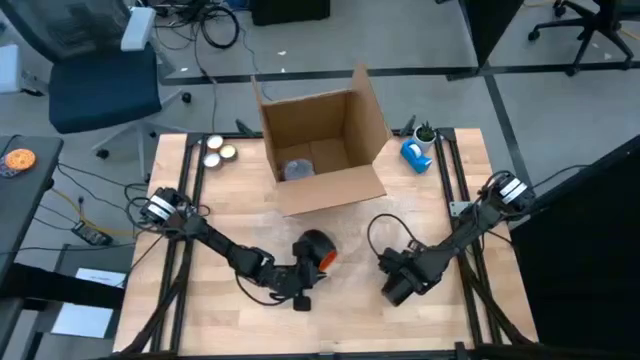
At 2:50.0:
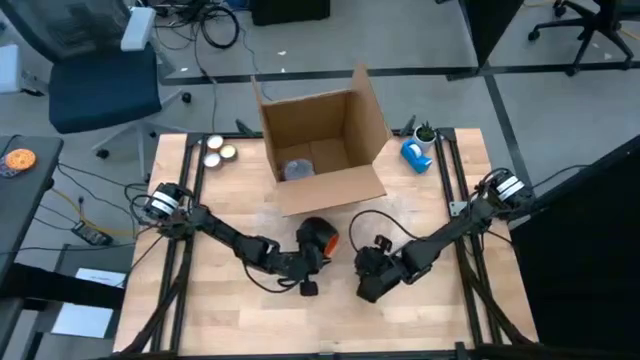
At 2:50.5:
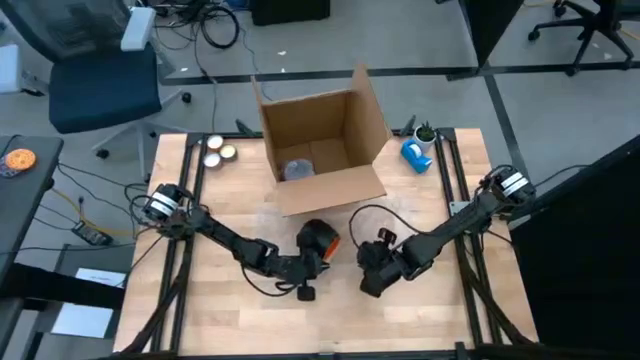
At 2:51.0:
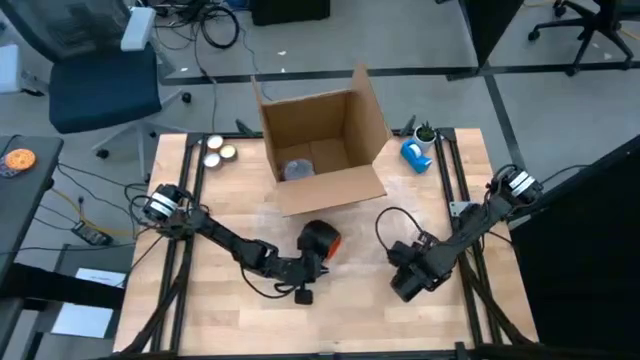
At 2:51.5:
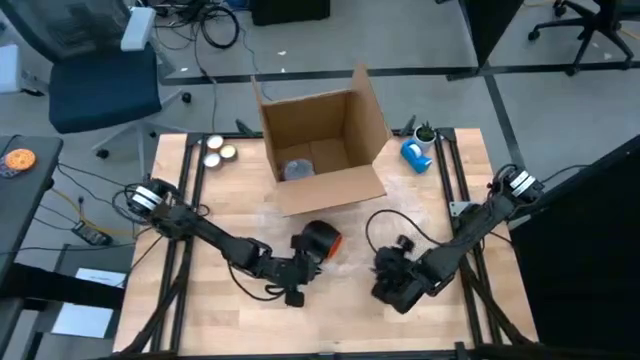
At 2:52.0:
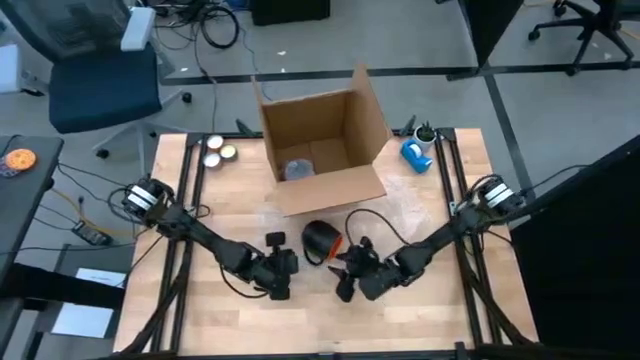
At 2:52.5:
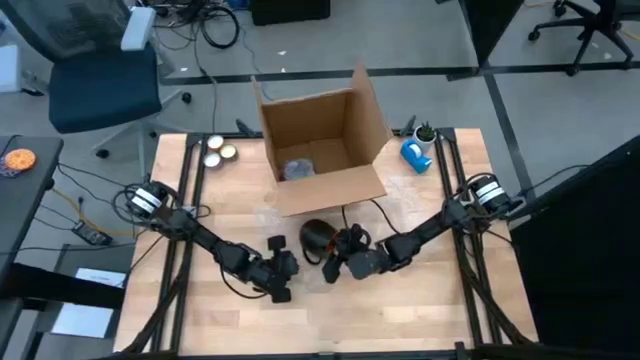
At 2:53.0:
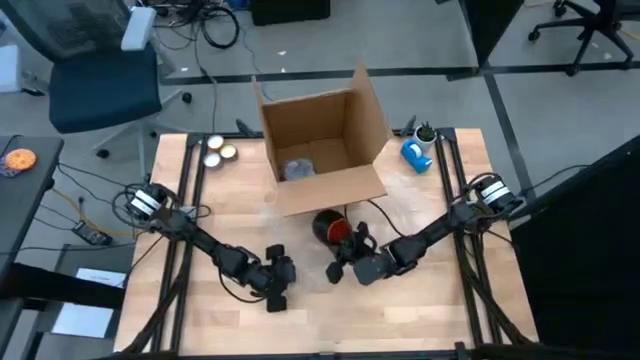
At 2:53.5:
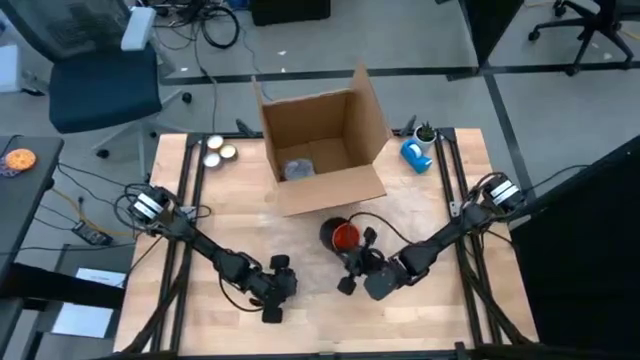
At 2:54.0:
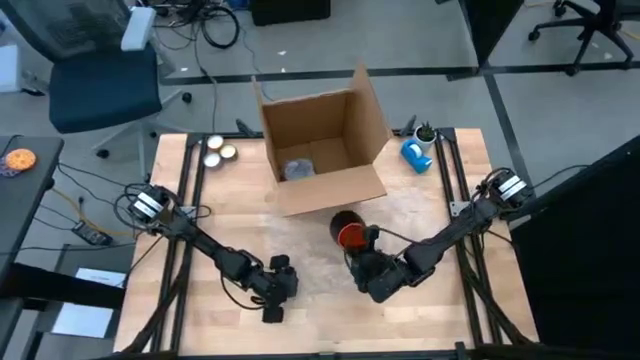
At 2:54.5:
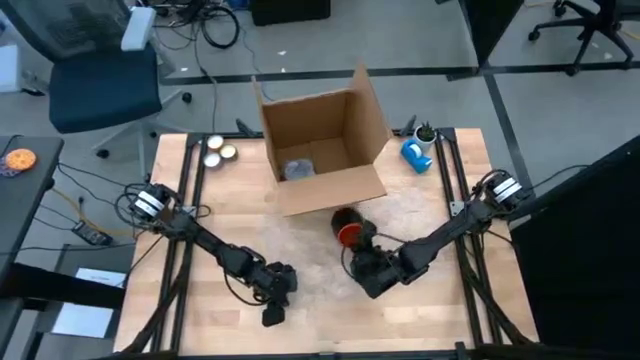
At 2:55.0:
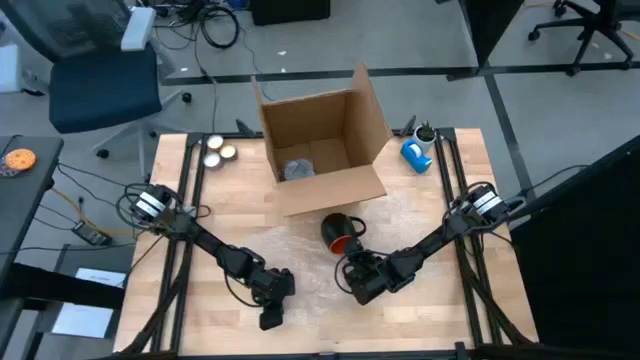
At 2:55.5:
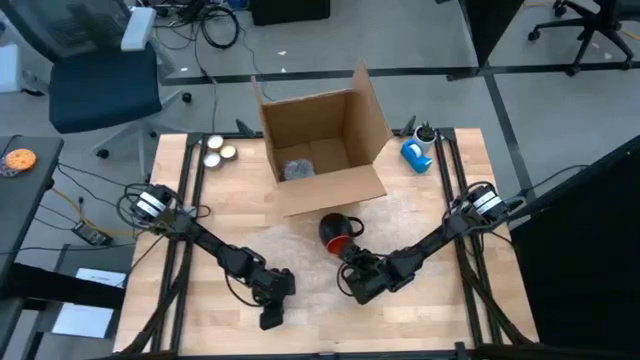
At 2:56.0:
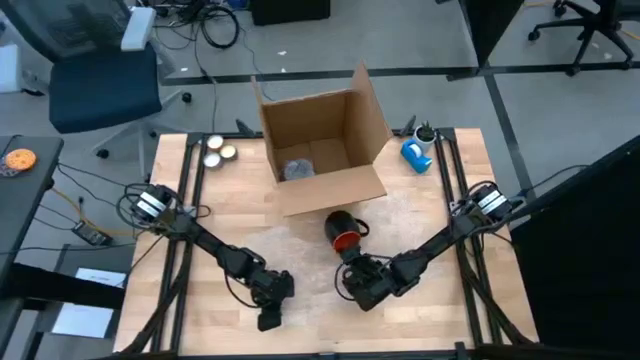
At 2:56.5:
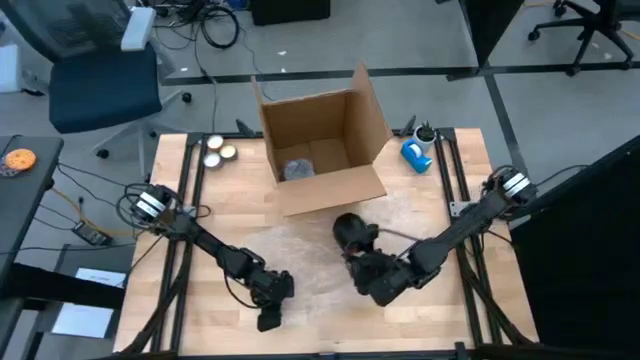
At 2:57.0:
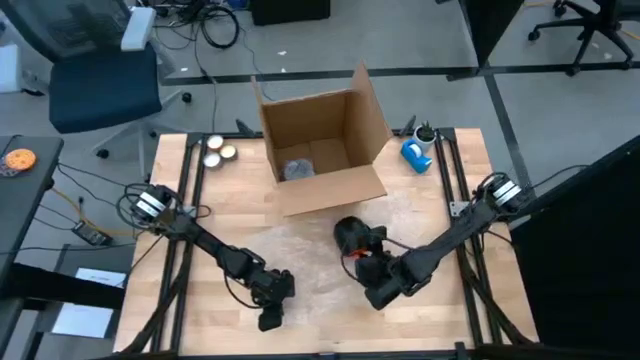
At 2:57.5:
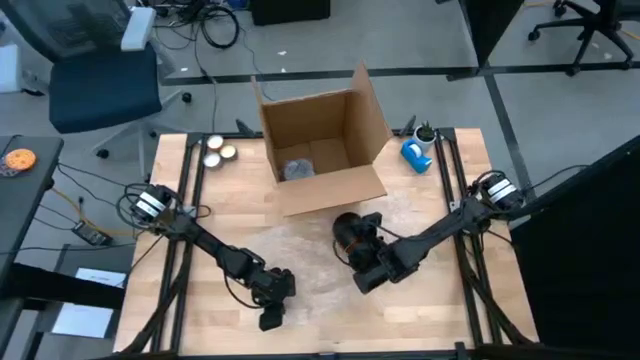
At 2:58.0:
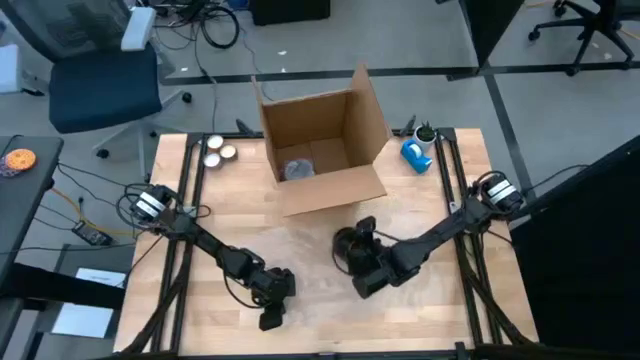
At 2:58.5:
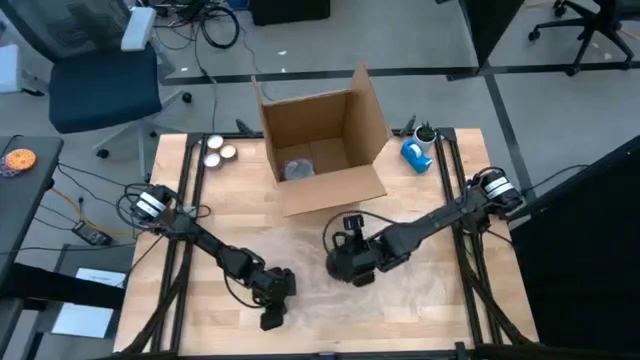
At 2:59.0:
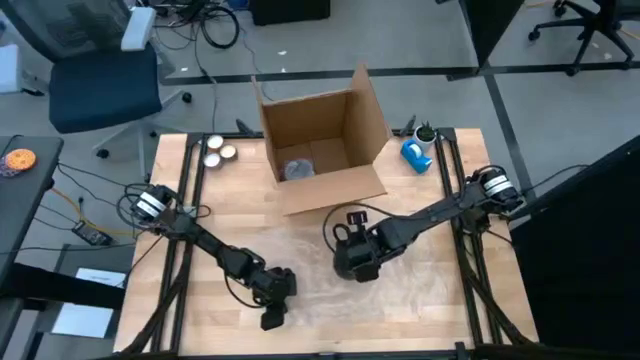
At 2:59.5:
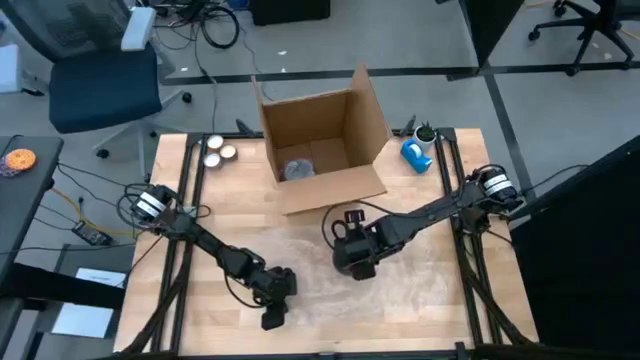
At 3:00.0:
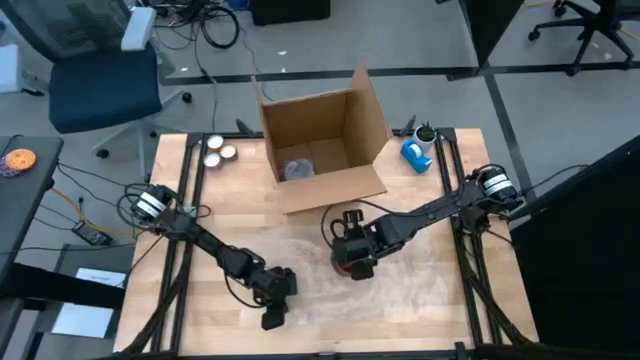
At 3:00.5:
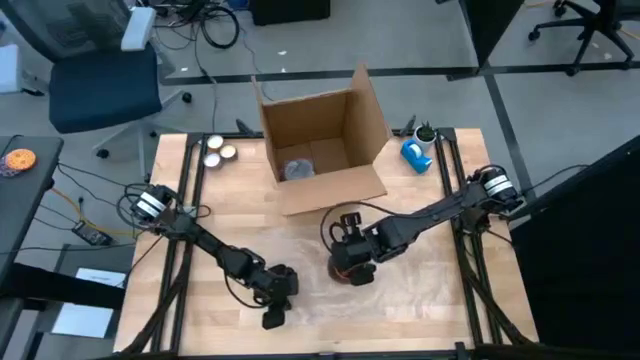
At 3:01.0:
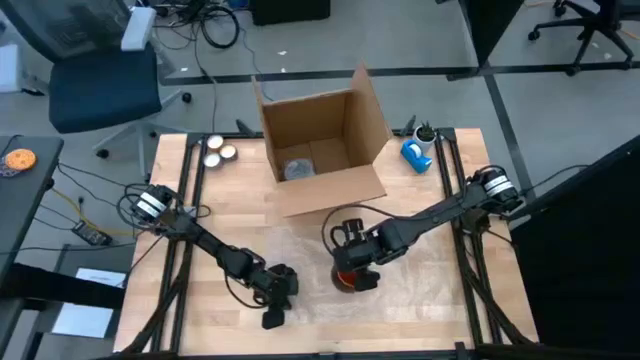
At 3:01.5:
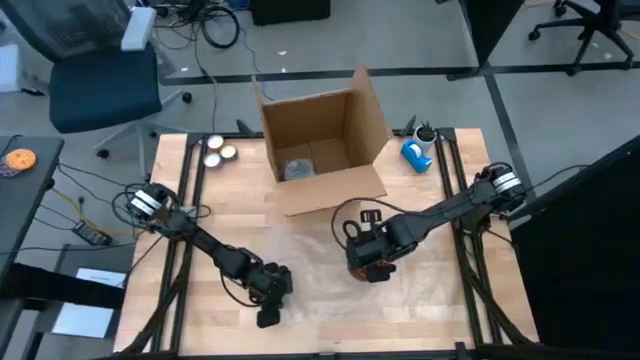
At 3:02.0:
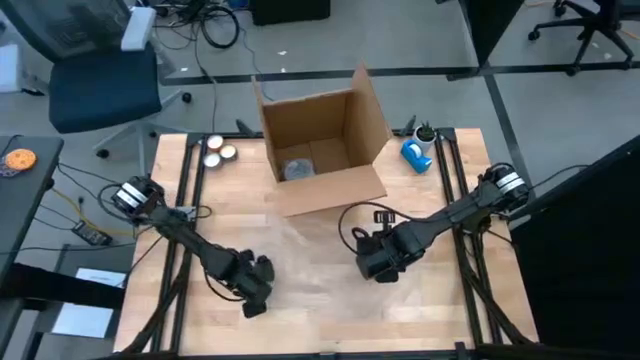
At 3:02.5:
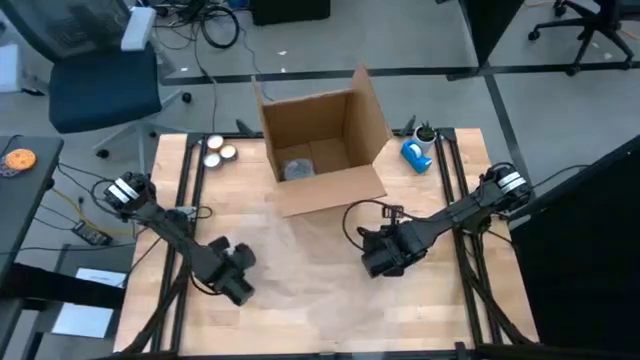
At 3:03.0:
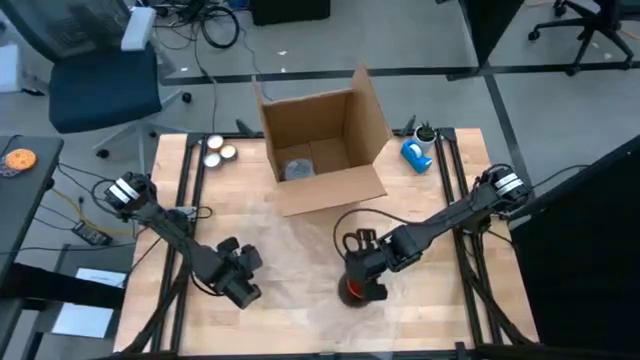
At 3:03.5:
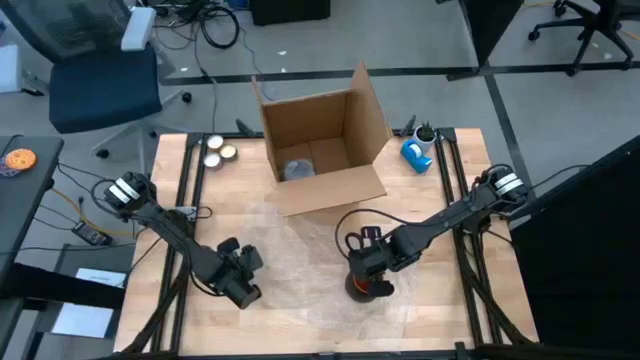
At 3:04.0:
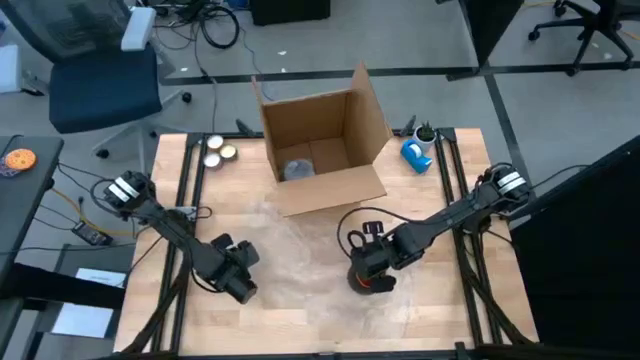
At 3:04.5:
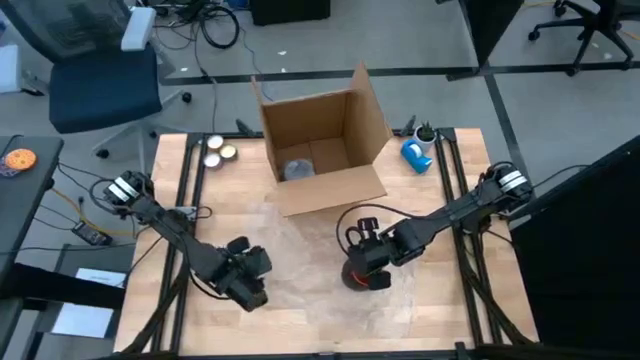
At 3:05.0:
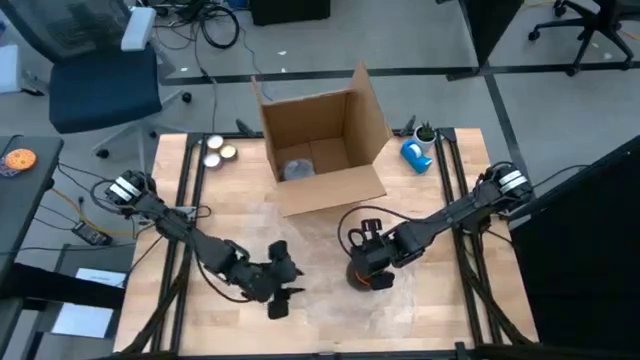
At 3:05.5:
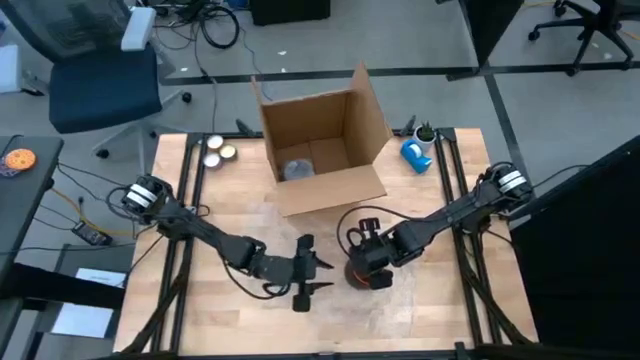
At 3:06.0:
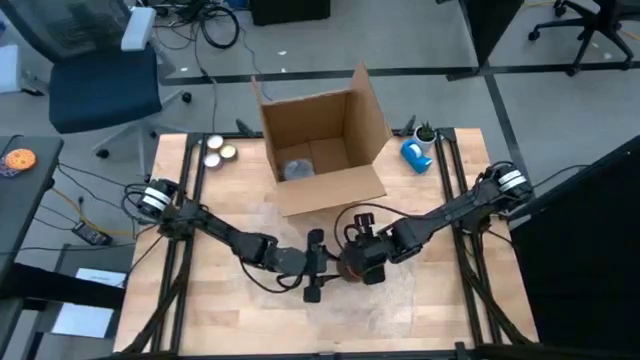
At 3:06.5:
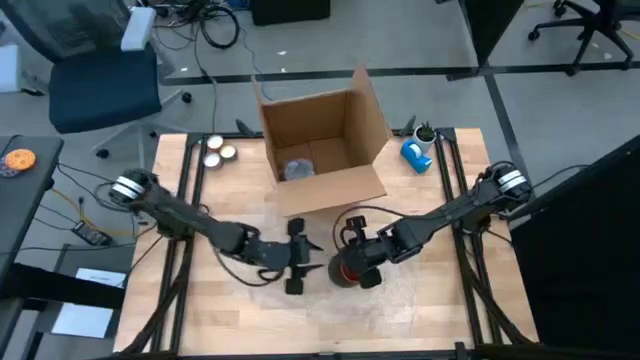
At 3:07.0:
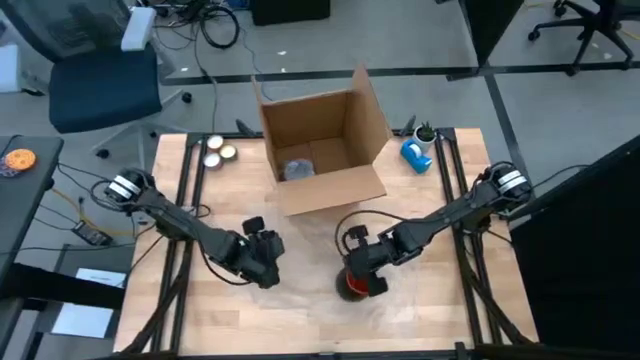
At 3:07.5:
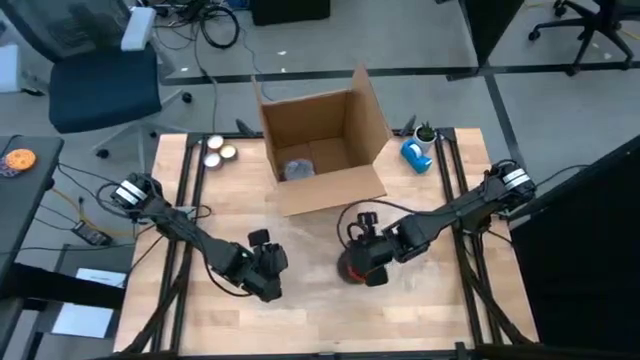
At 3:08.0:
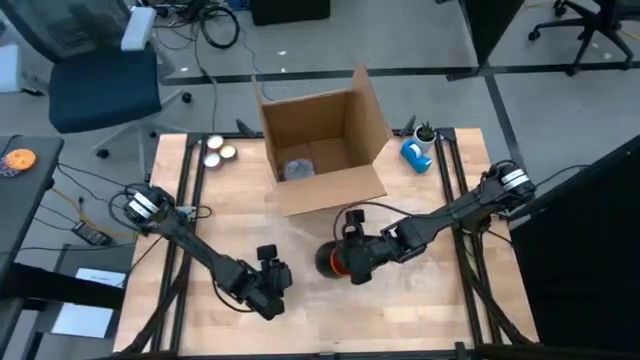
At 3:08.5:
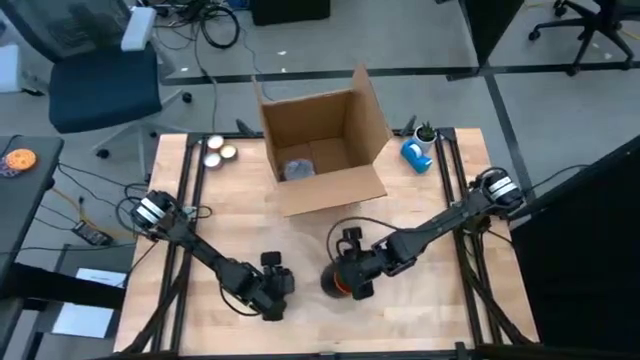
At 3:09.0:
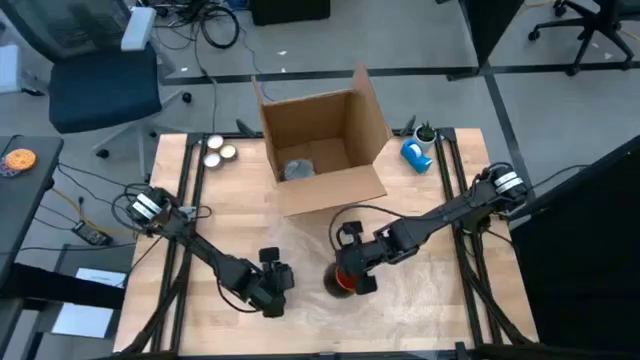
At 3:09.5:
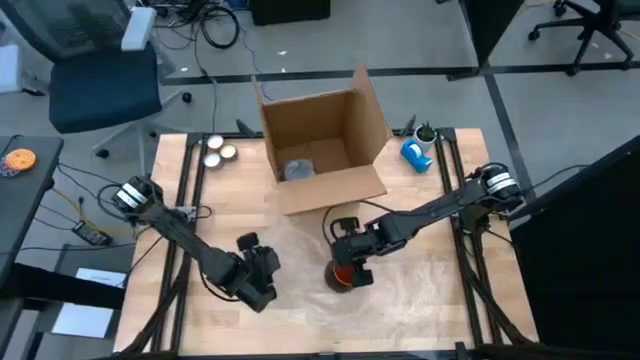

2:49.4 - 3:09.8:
Task: wrap mug
Wrap the black mug with the bubble wrap
